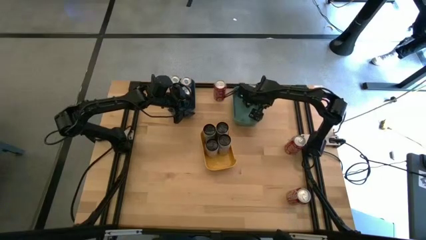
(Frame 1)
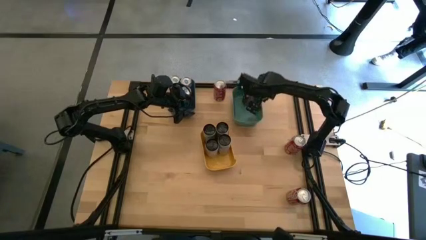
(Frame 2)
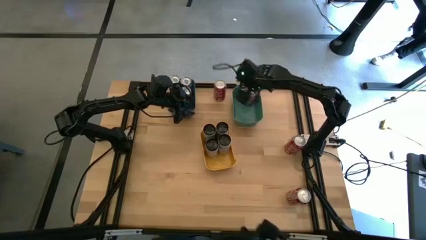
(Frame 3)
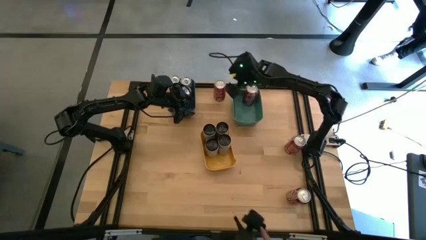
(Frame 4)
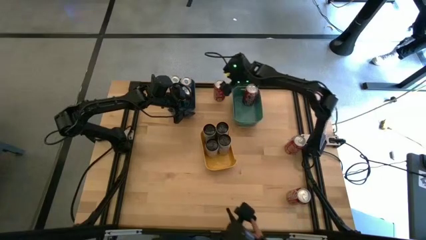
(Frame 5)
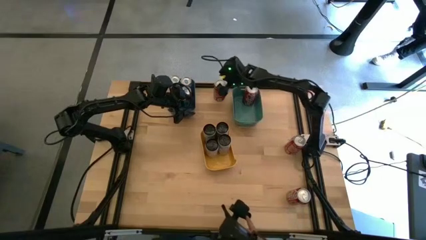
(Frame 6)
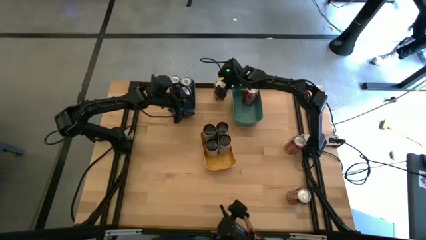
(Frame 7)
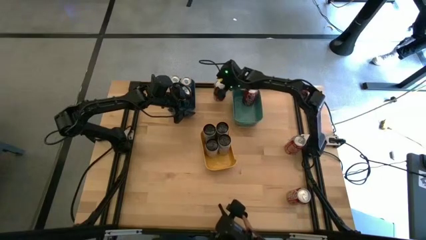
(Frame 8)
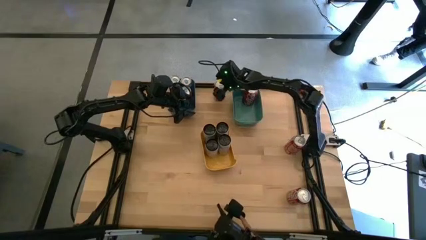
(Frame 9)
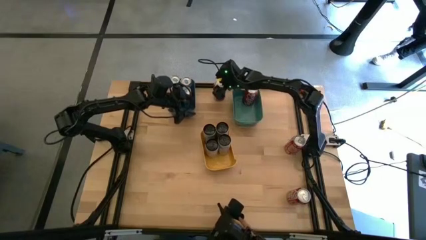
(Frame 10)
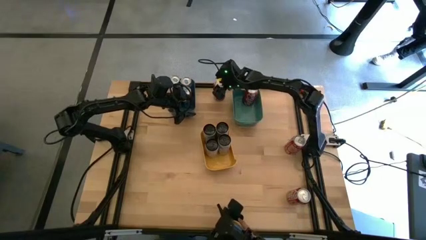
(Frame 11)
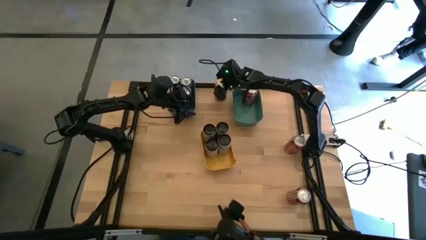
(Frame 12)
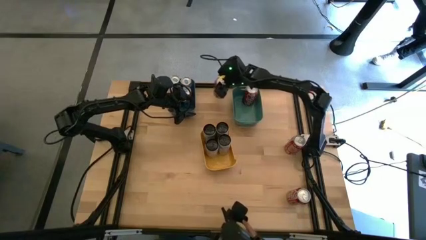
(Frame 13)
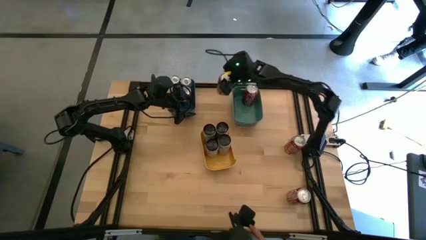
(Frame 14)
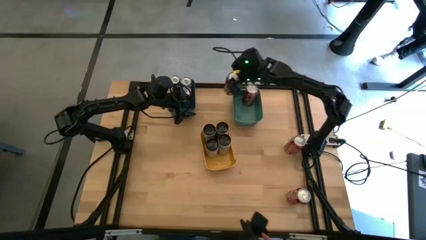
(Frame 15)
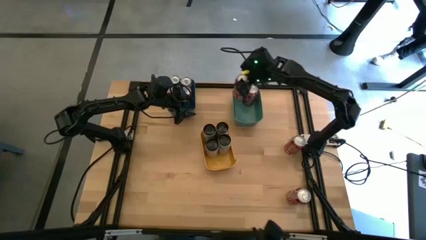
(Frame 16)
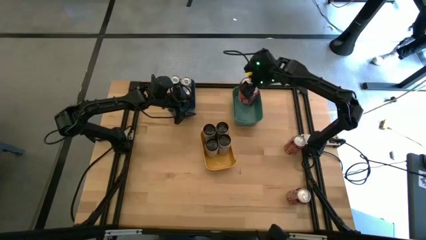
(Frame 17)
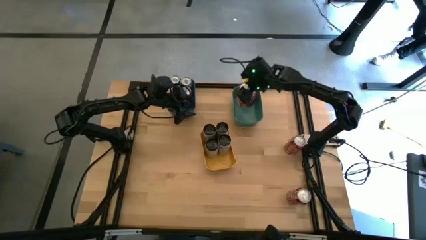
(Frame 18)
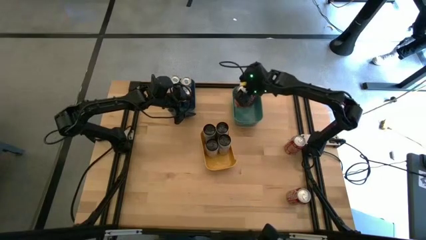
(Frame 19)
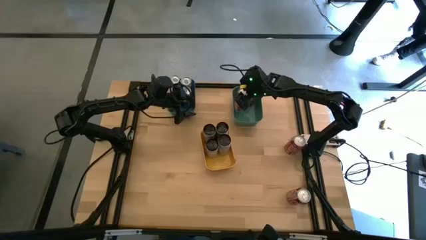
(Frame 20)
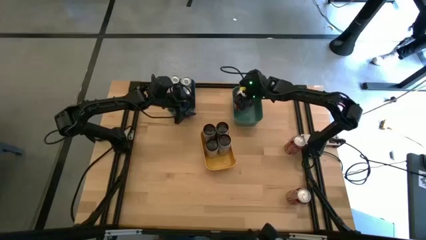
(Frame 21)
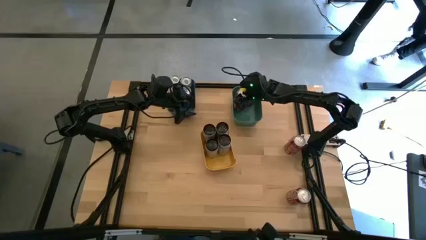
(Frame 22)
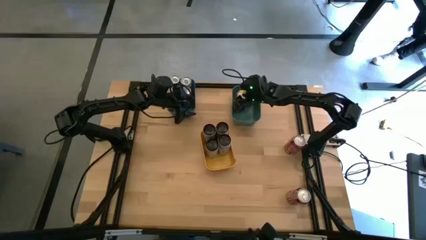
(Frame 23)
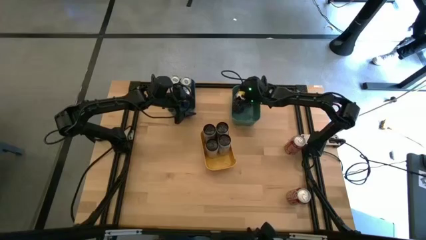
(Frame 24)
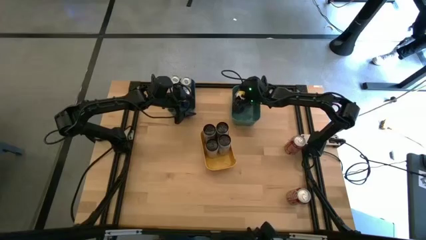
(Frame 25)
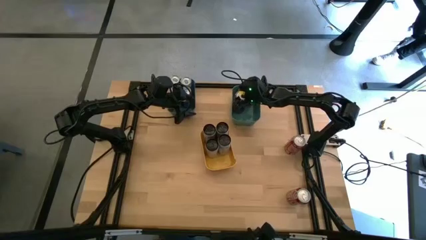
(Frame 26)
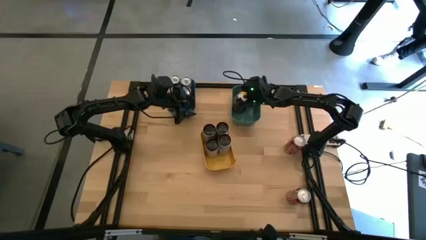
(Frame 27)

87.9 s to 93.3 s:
Task: Sort soda cans
Put the top red soda can into the green bin

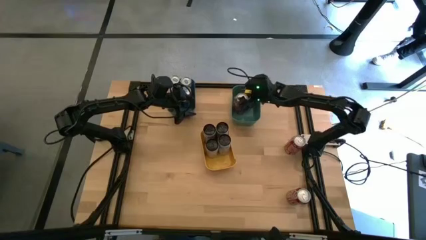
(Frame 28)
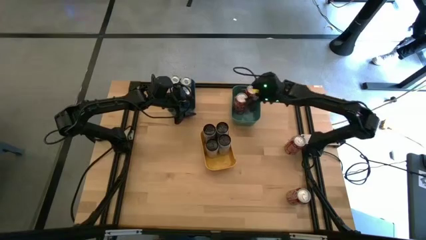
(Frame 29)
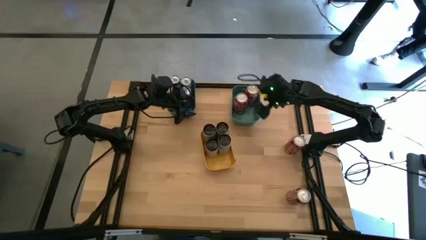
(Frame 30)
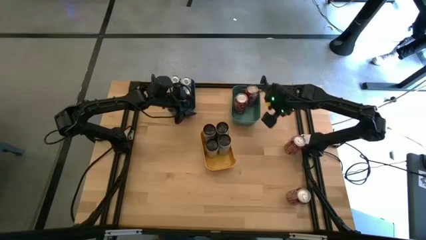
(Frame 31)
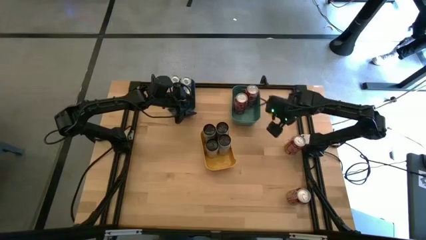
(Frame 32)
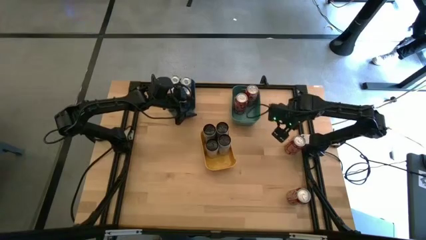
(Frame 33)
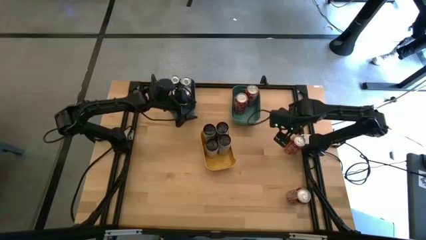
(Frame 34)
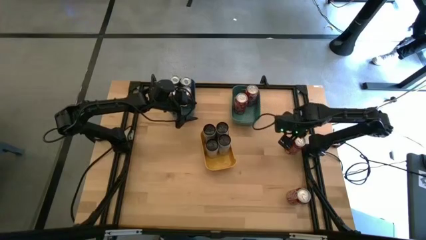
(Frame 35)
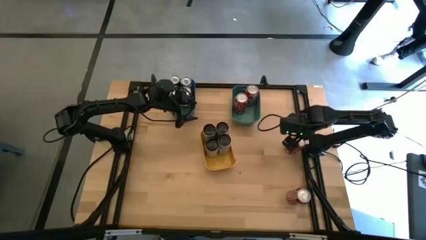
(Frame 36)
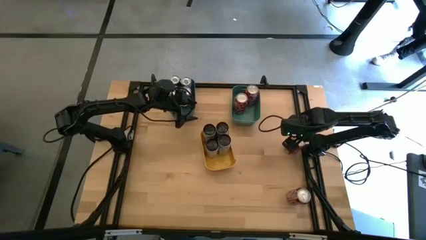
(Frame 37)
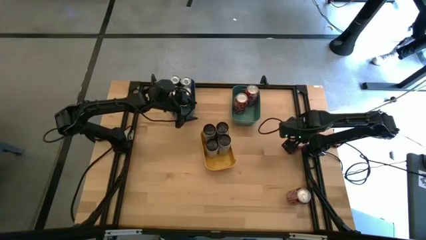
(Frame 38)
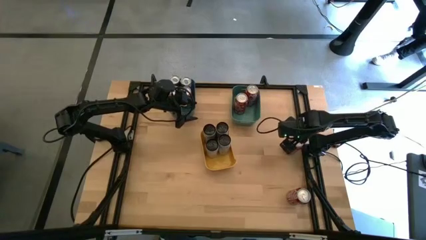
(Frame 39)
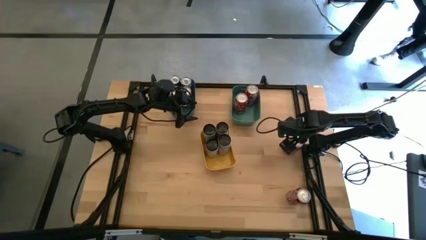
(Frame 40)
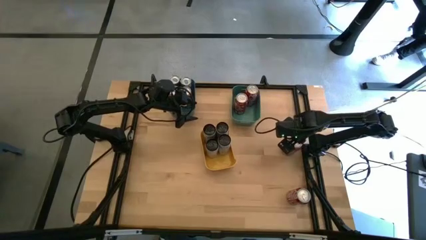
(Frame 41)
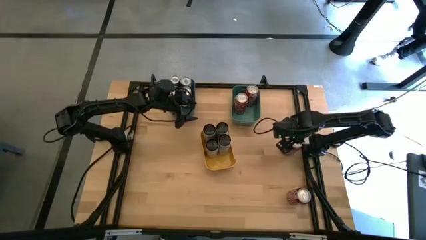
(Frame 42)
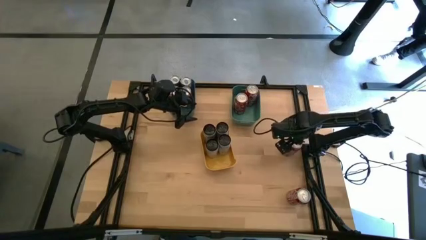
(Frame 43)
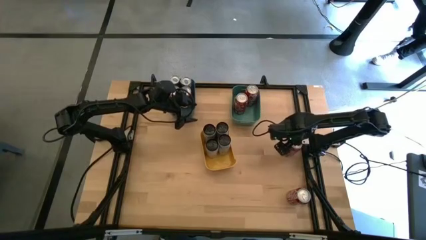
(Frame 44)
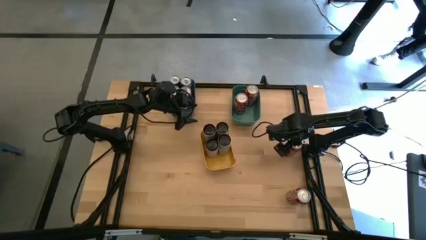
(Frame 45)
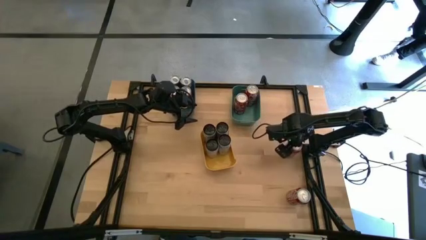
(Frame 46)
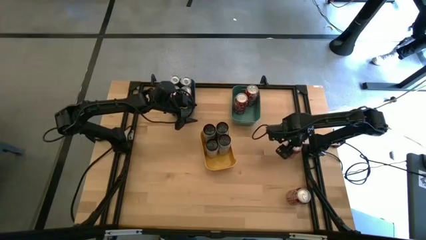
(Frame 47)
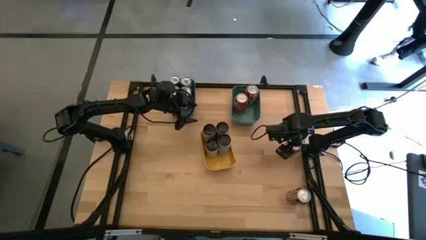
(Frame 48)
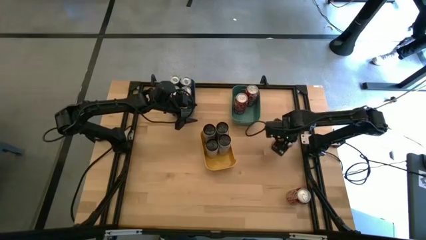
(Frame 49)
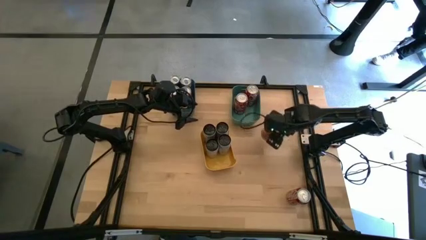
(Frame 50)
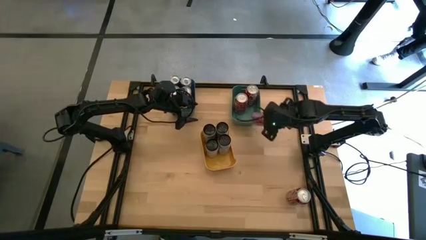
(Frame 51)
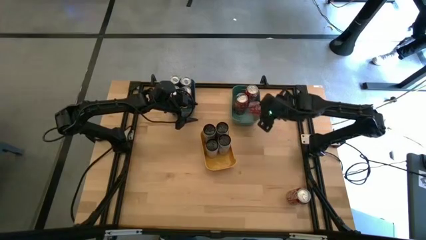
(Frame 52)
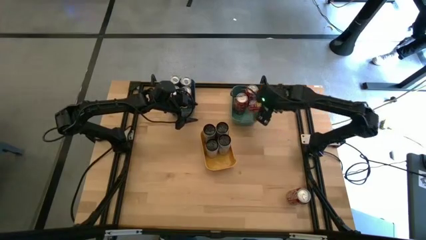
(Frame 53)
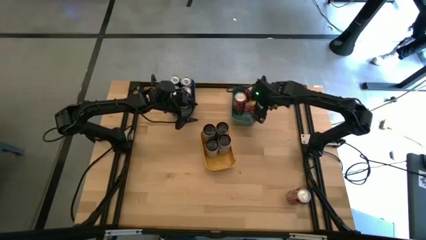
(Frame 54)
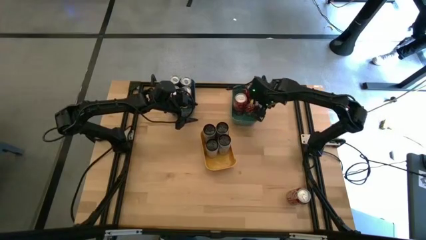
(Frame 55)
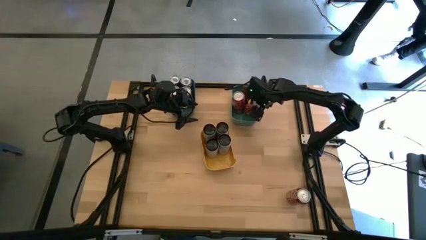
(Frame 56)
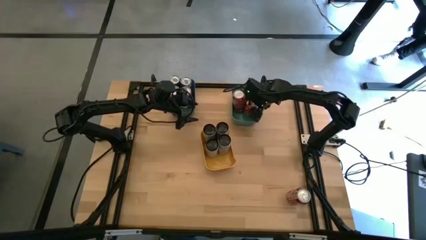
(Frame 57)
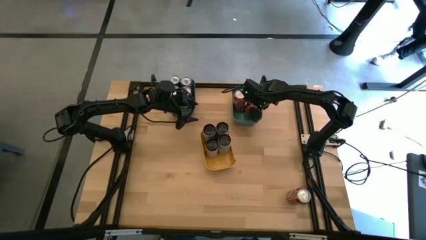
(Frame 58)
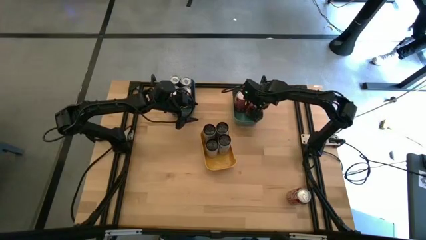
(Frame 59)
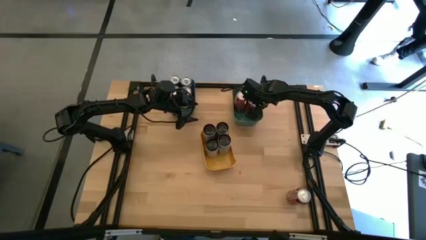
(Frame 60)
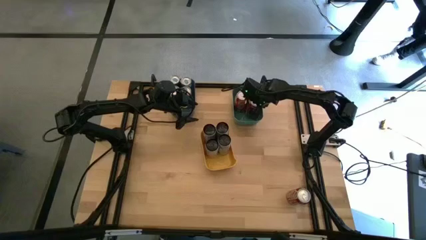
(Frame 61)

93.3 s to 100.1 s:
Put the top red soda can into the green bin
